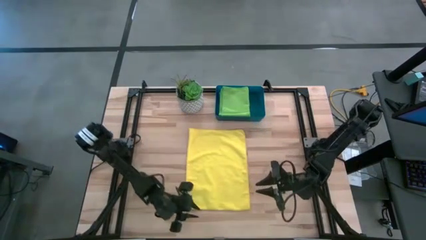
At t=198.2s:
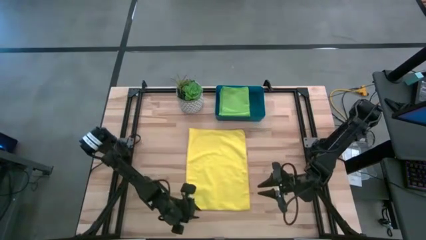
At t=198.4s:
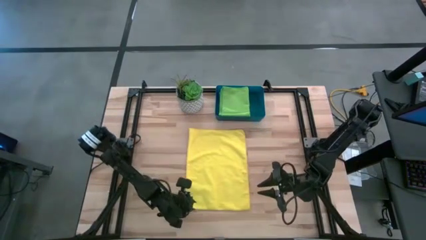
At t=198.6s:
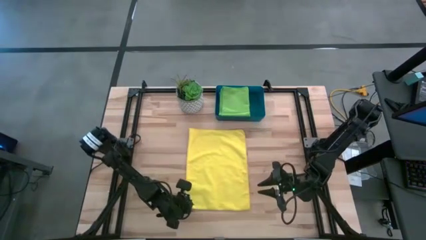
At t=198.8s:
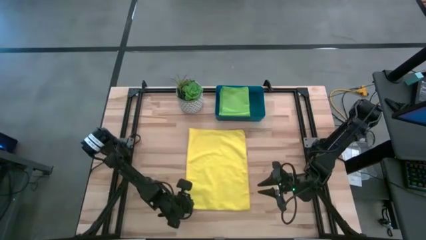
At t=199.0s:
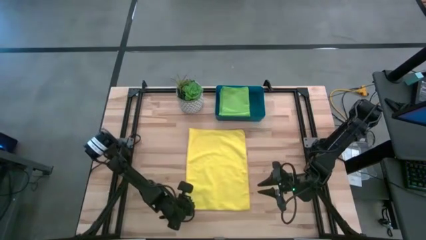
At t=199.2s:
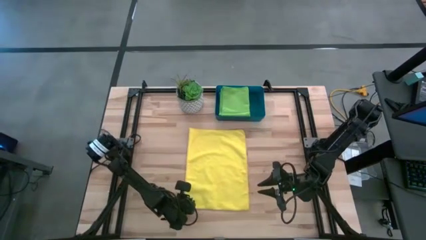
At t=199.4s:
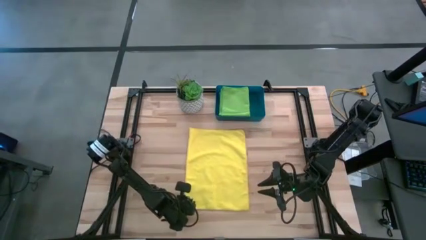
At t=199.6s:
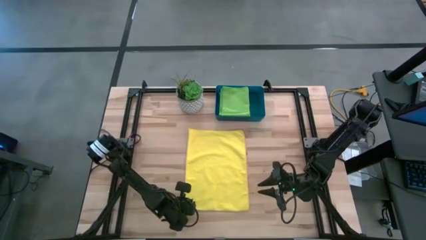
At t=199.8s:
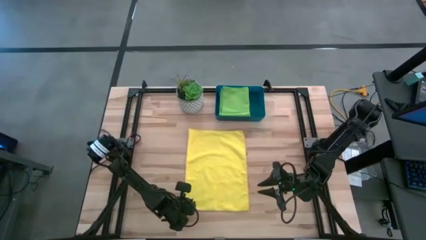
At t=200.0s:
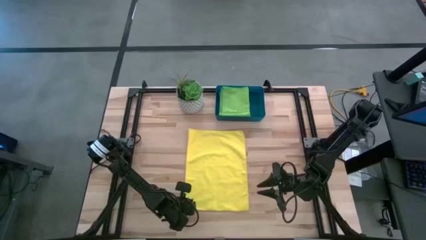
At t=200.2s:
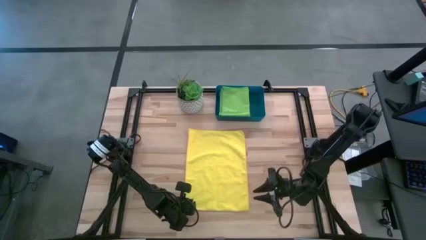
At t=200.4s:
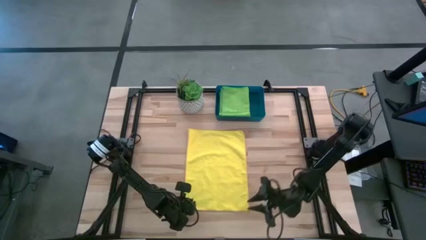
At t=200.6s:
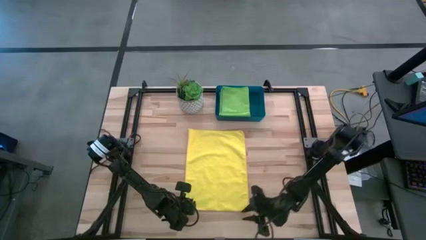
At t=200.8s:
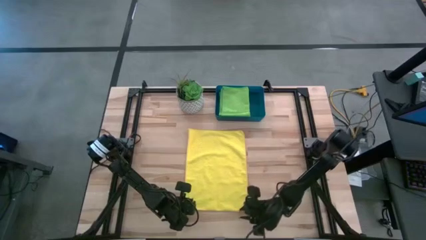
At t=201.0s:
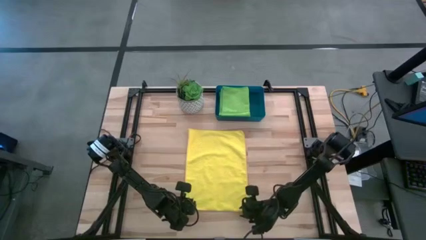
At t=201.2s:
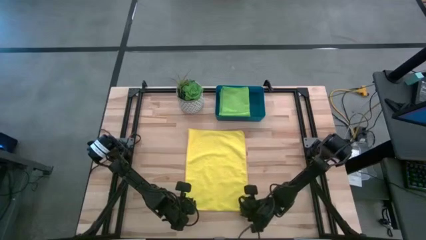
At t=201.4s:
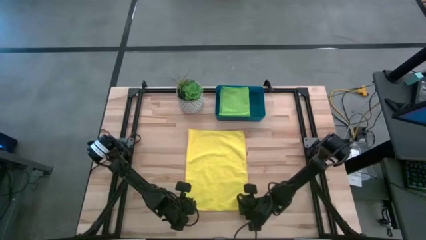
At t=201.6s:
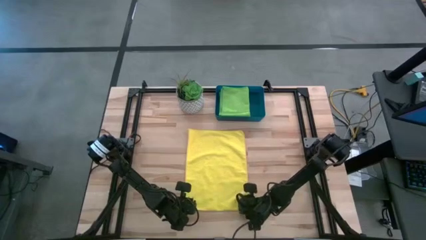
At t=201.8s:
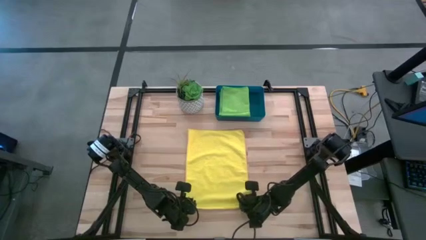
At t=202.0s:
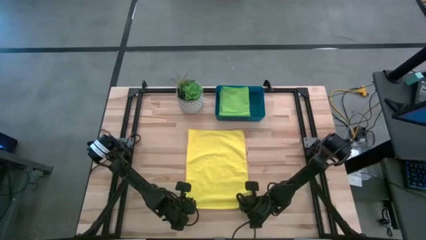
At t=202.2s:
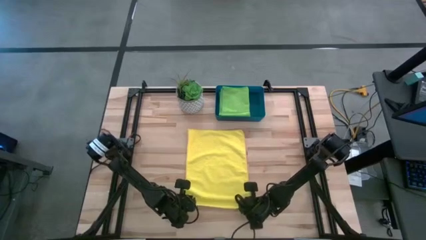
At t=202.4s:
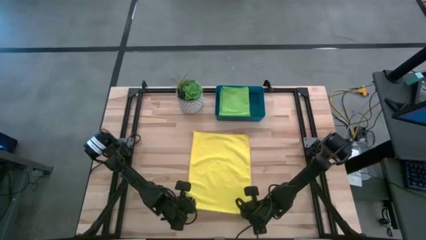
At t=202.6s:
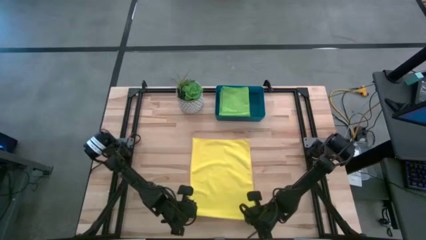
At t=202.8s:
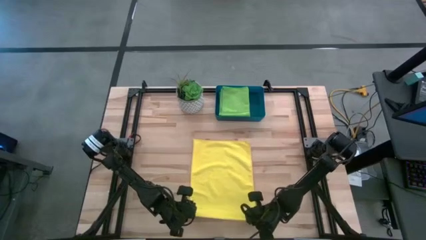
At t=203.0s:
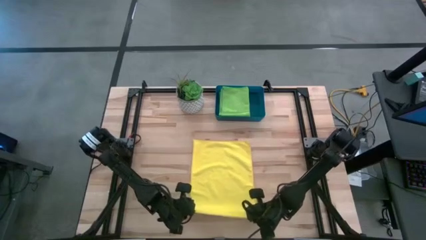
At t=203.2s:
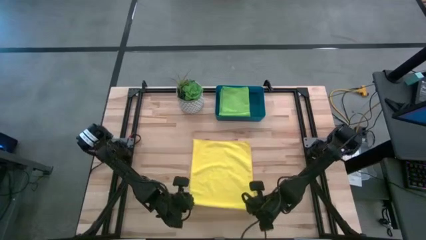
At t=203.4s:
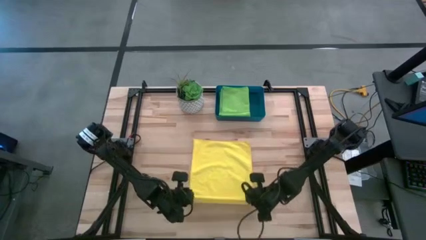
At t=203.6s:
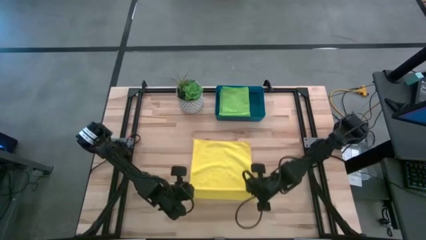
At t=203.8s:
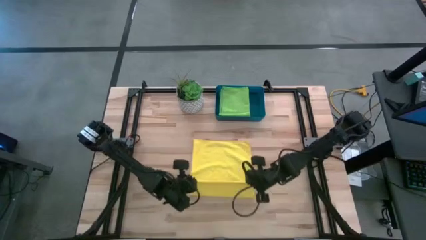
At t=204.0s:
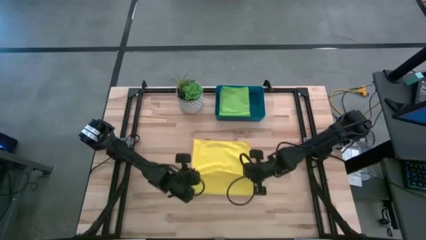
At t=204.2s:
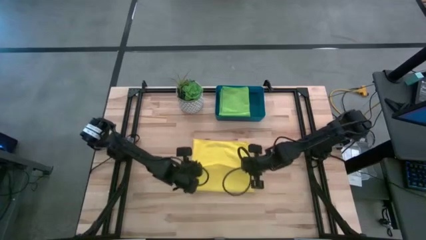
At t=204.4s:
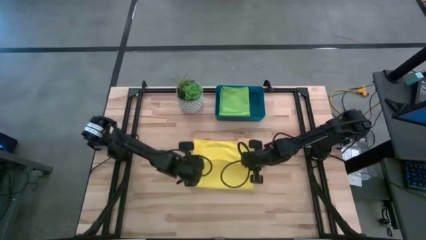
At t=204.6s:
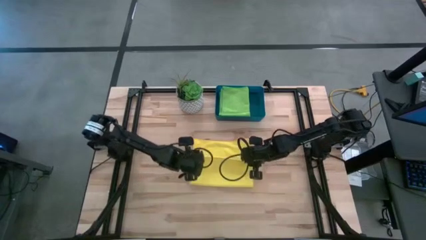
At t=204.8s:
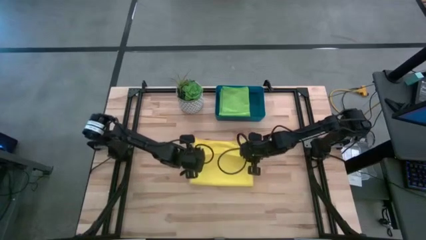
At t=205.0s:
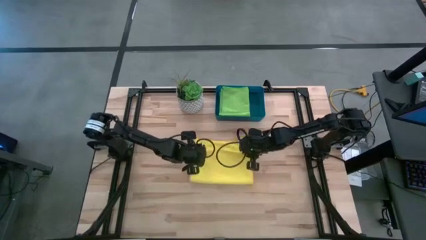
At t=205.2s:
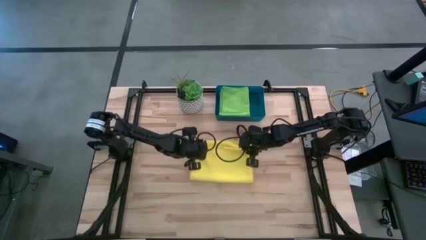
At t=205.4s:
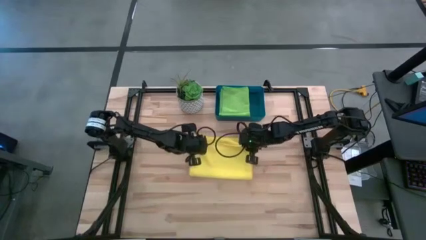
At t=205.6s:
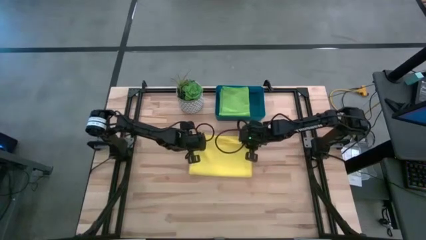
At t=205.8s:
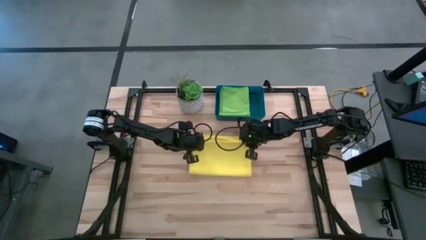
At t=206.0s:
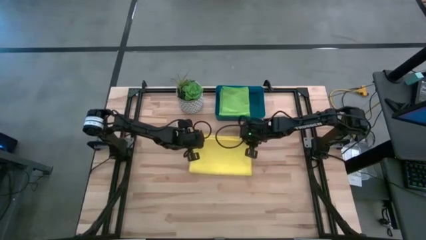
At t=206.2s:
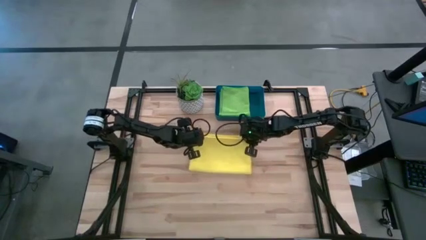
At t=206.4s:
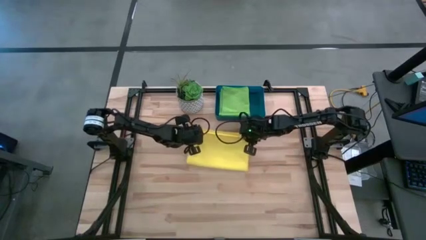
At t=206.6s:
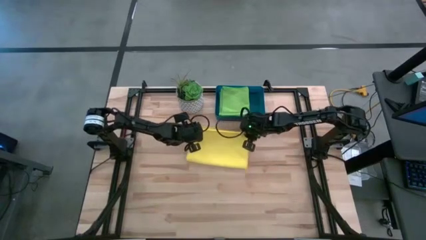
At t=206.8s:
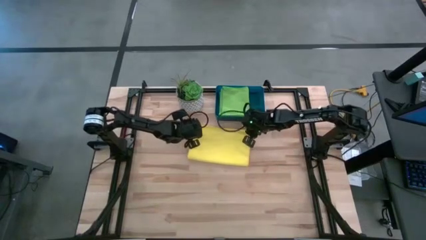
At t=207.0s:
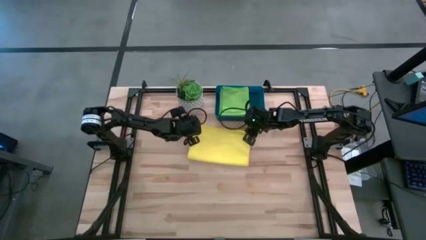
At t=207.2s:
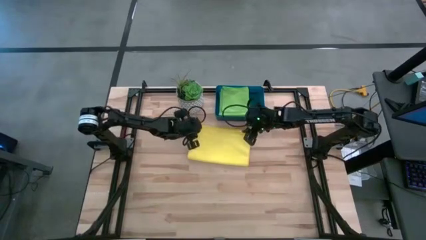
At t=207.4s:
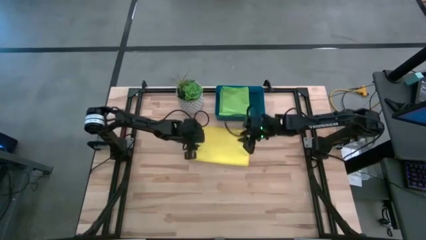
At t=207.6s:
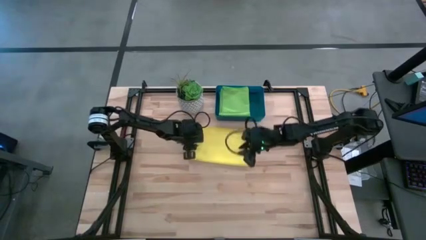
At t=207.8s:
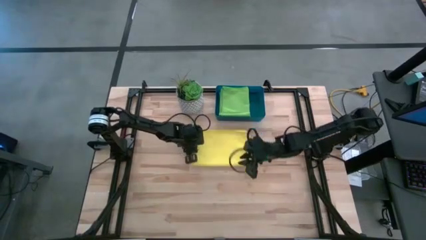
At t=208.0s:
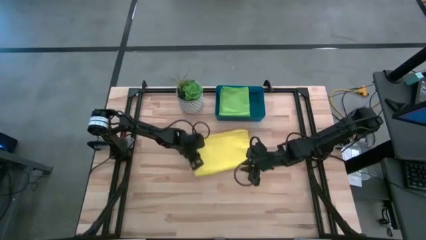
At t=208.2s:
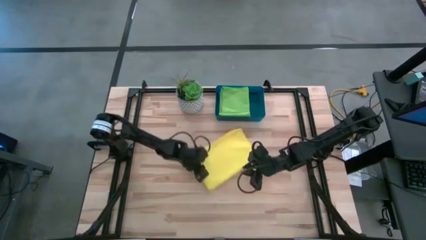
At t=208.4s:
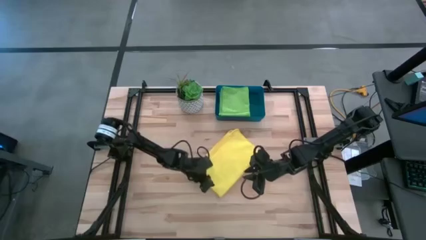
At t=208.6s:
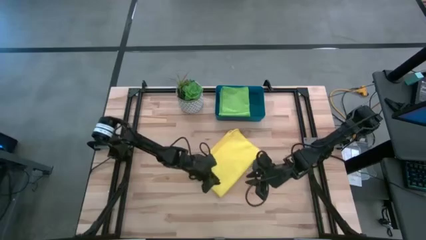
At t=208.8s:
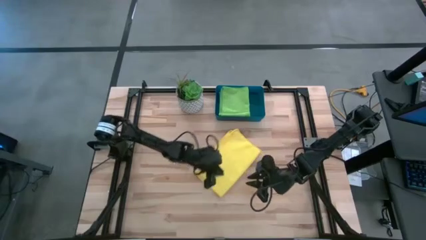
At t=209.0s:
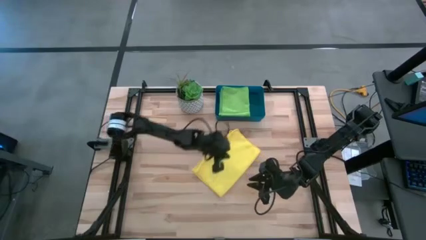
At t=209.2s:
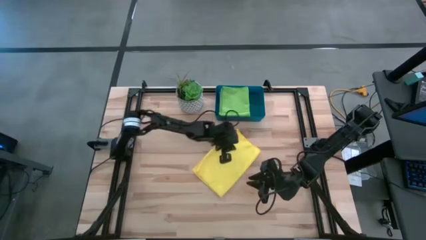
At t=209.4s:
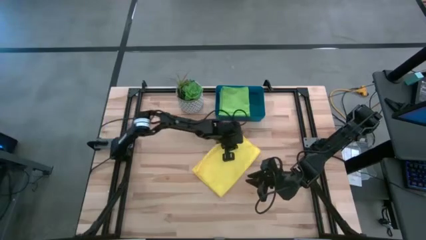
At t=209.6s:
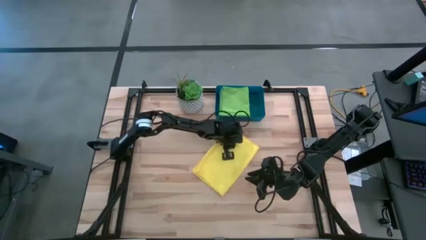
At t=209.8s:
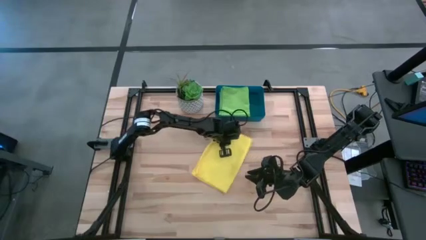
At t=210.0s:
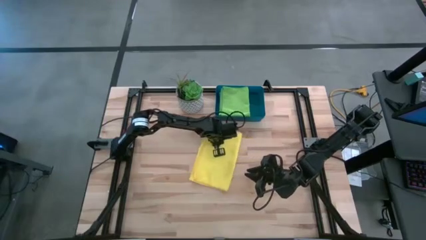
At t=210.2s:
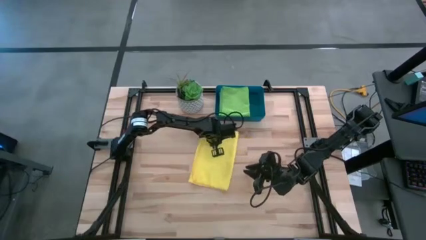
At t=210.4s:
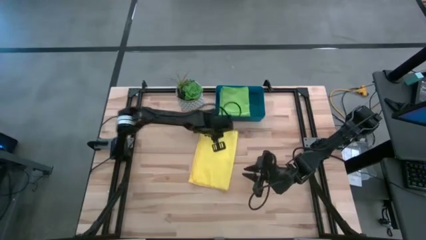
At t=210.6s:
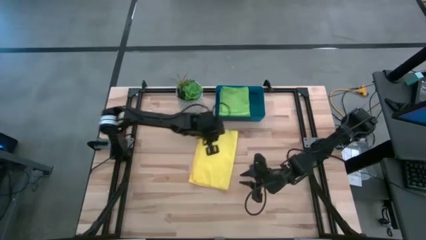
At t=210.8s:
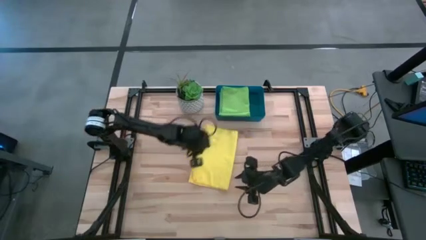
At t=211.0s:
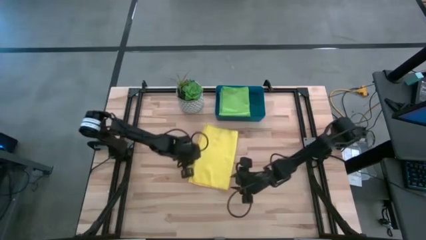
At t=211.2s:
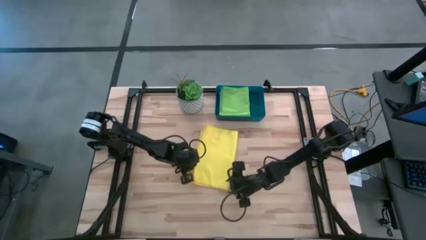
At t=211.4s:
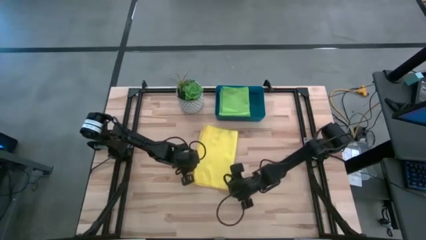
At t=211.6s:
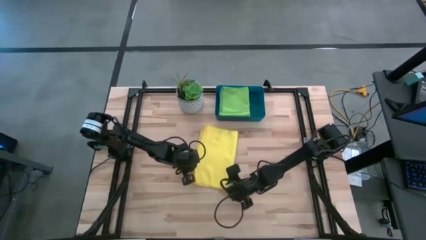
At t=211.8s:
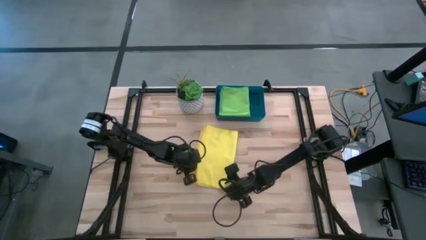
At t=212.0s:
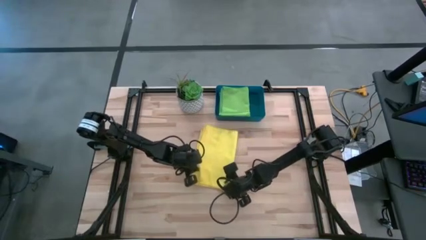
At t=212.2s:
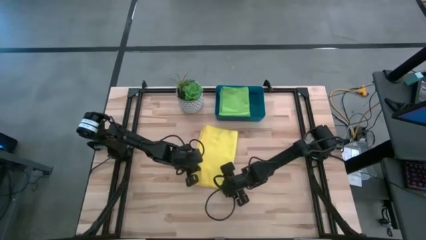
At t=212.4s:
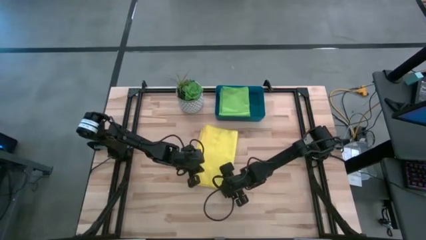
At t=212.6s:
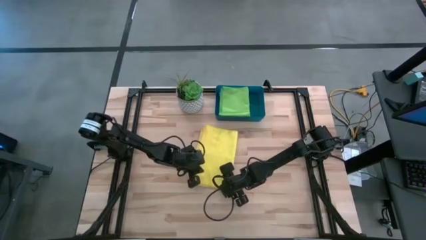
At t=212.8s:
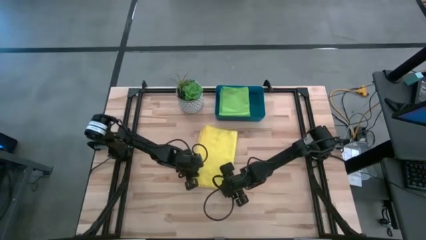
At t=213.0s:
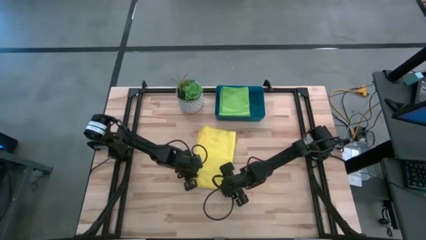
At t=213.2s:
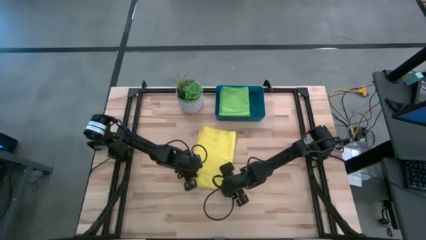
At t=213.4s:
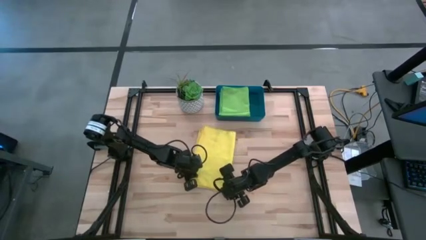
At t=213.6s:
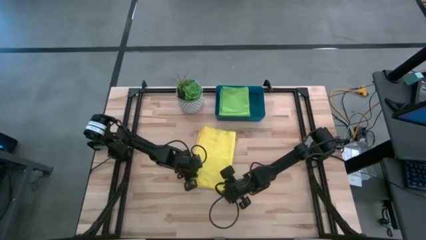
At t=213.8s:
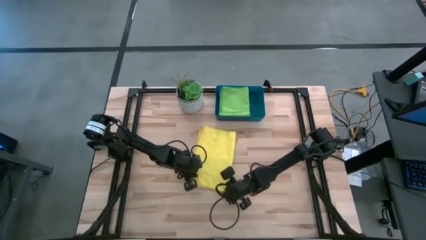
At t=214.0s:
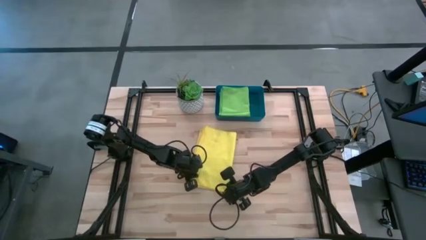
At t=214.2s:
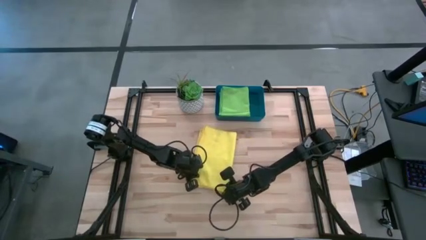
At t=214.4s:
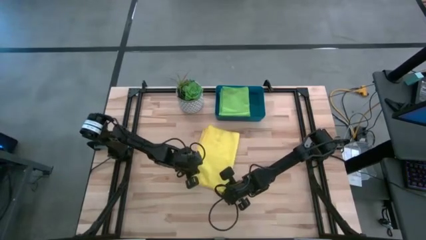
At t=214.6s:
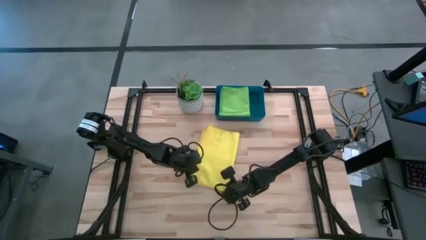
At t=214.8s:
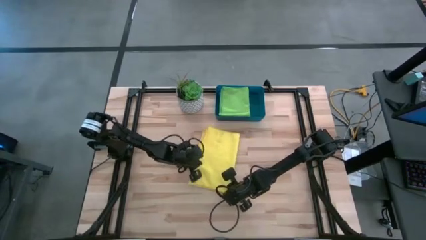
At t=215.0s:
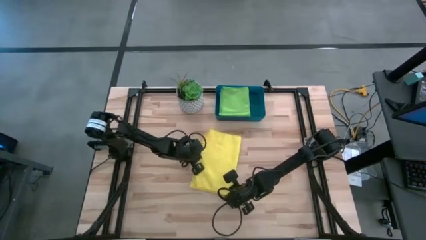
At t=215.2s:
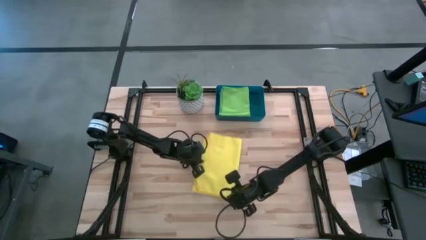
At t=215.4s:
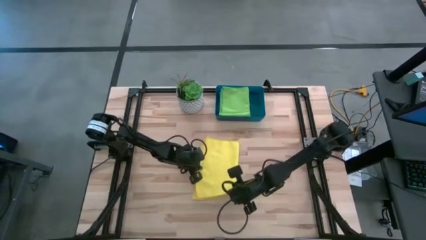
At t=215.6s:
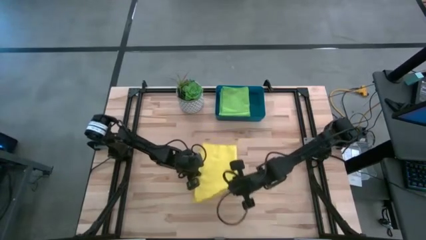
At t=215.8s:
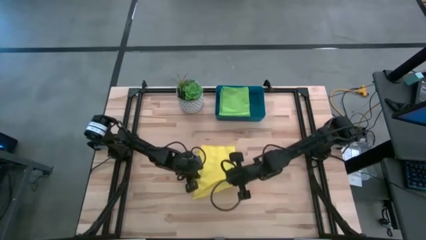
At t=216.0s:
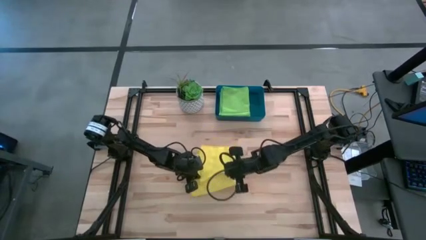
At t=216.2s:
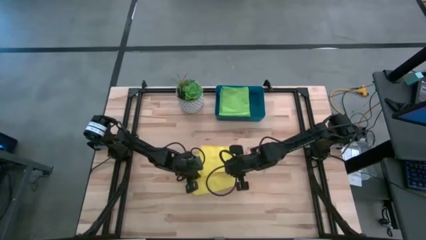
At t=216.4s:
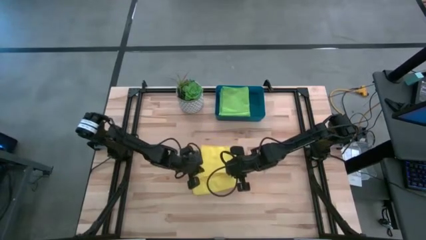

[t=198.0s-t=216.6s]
Task: Fold microfiber towels
Fold the yellow microfiber towel on top of the green microfiber towel into the dark blue bin
